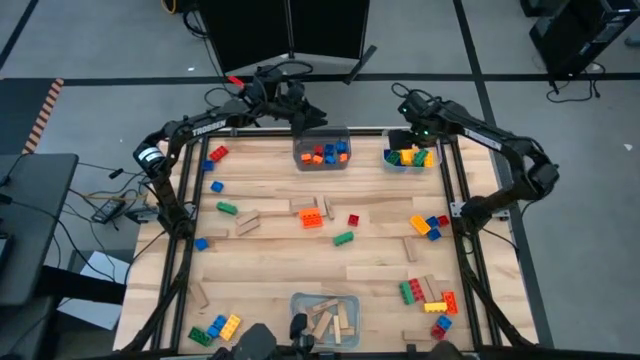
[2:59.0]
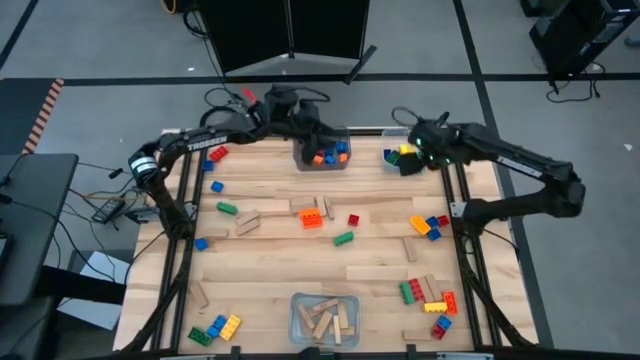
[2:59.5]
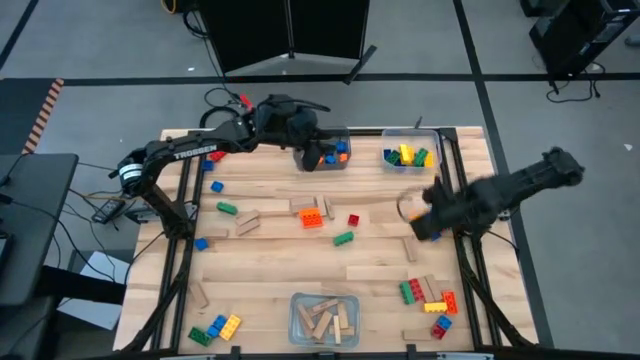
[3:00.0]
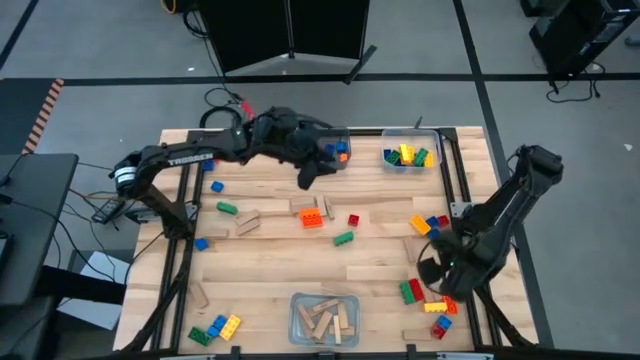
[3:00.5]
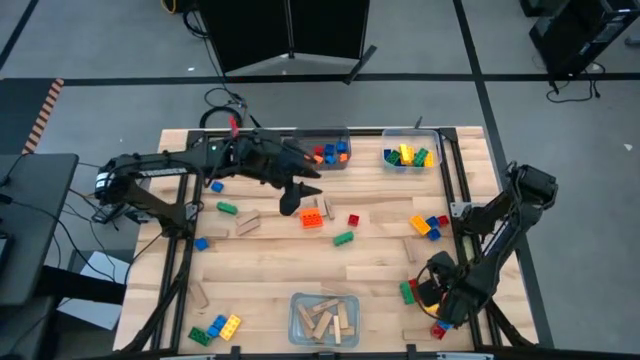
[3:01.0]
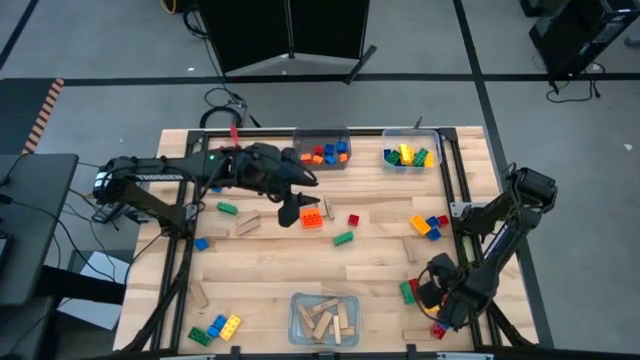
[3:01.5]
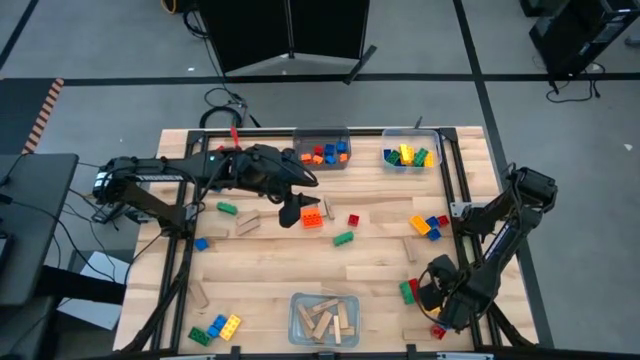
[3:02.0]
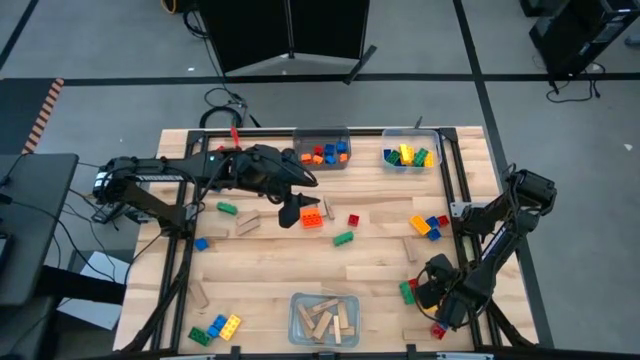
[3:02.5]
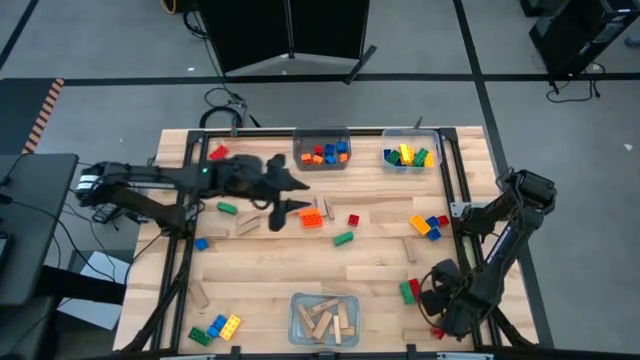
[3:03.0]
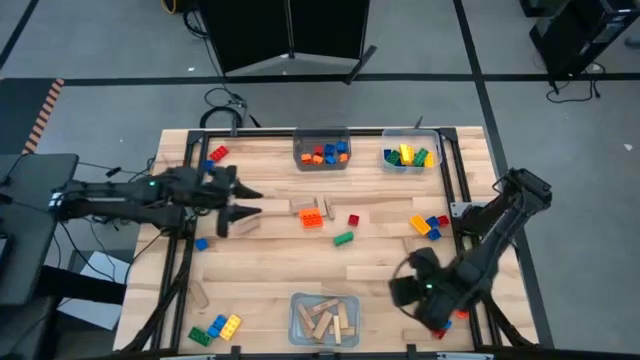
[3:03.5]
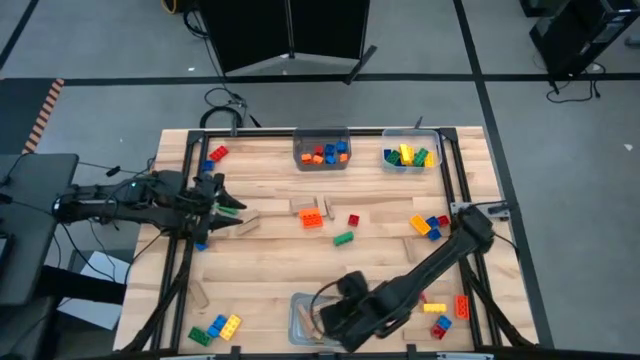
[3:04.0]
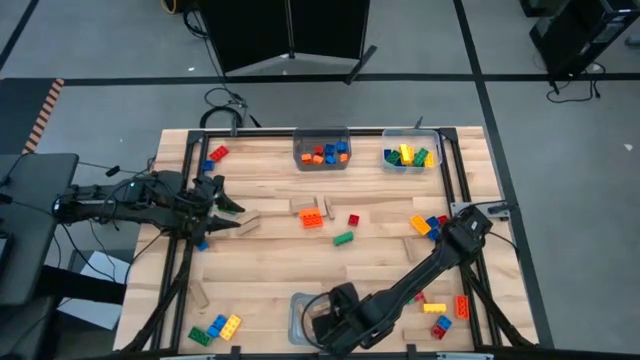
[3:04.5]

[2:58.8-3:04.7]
Task: Sort blocks by size
Put the brown block into the gray bin

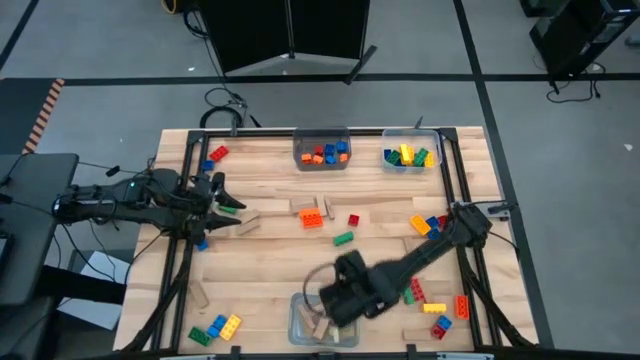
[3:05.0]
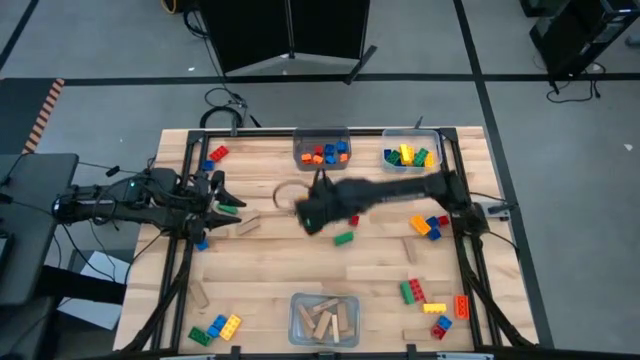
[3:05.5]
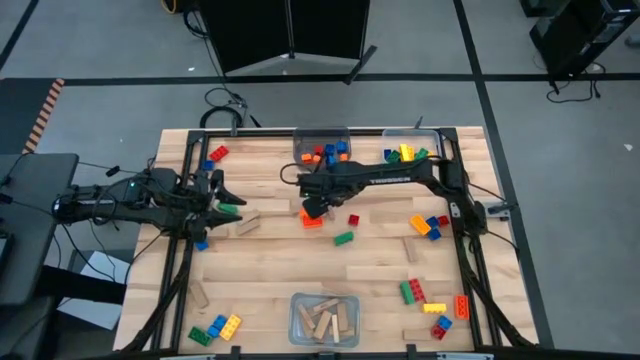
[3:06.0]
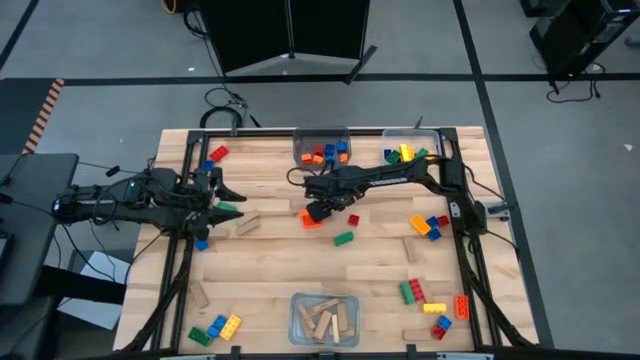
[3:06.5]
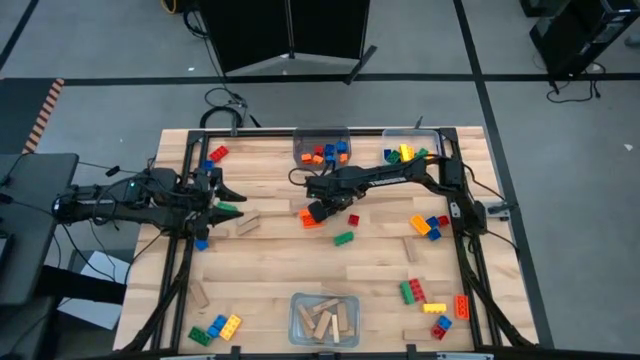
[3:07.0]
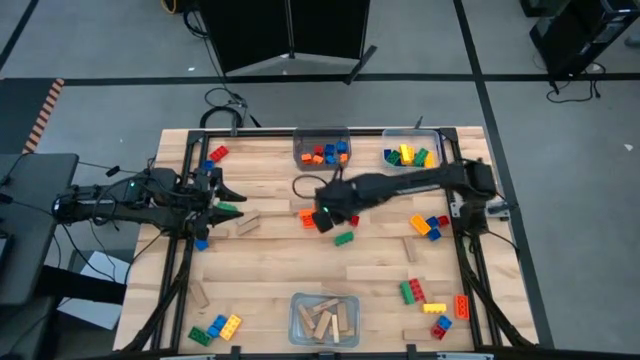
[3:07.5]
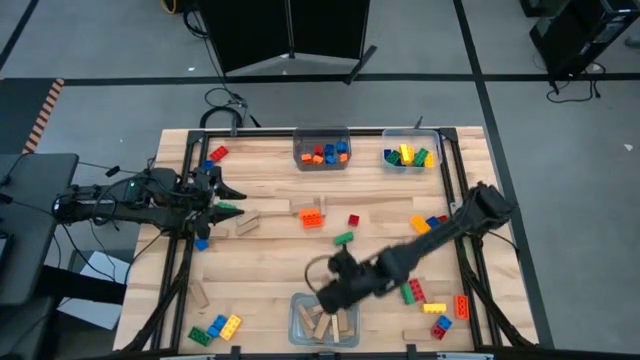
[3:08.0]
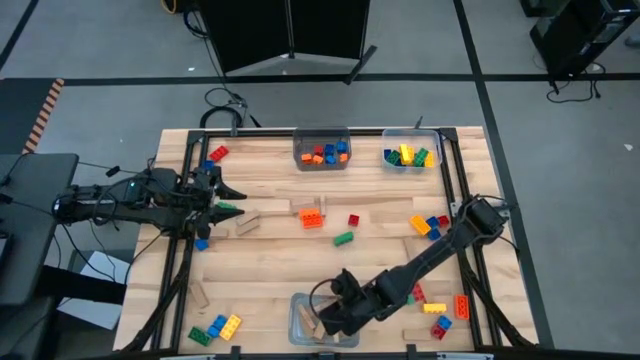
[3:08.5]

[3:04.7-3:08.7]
Put the brown block into the gray bin

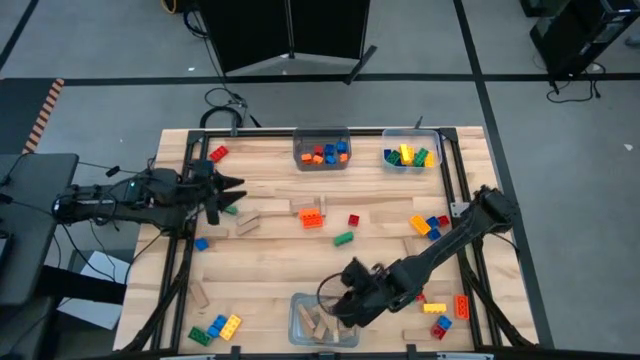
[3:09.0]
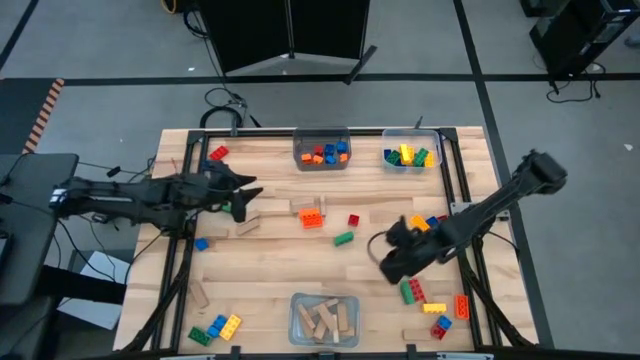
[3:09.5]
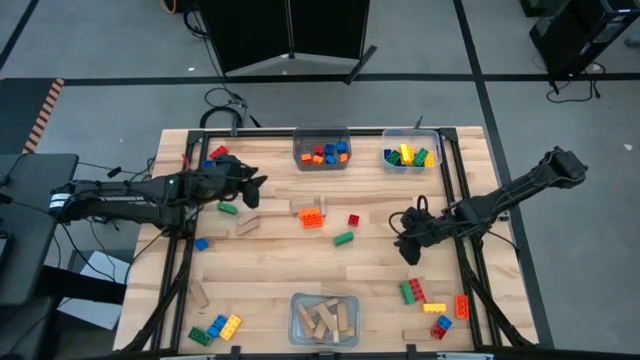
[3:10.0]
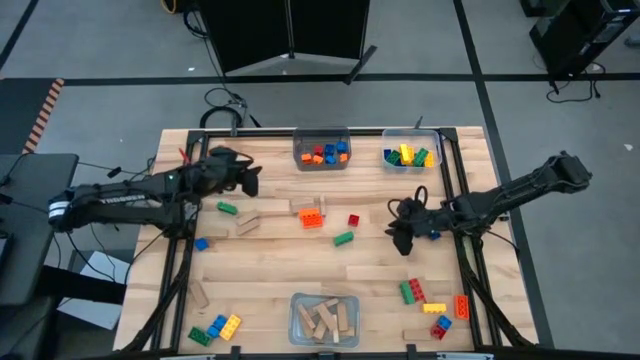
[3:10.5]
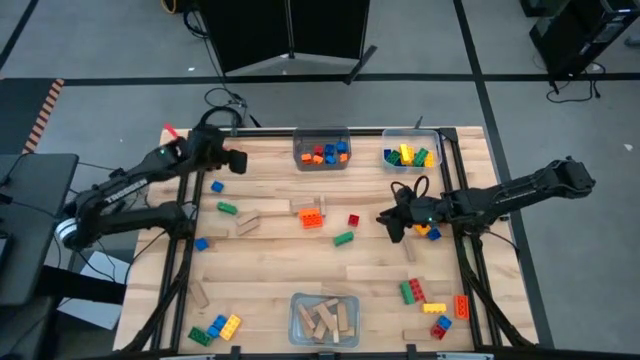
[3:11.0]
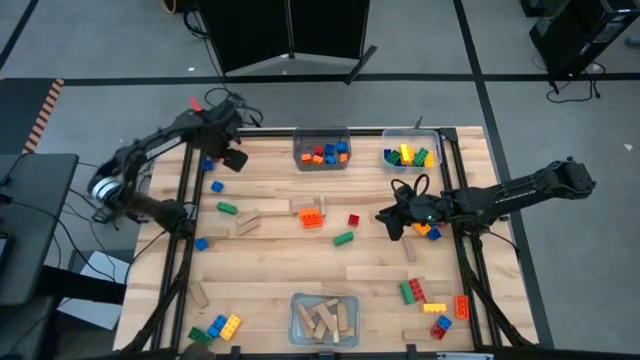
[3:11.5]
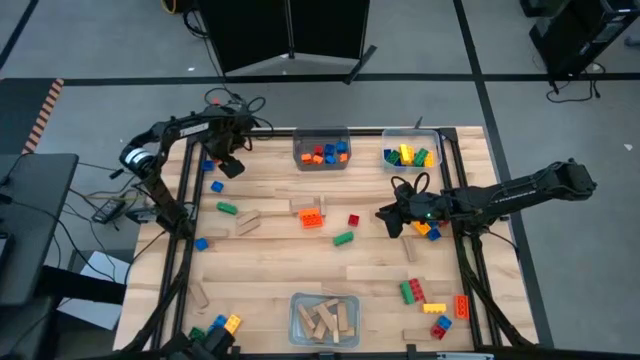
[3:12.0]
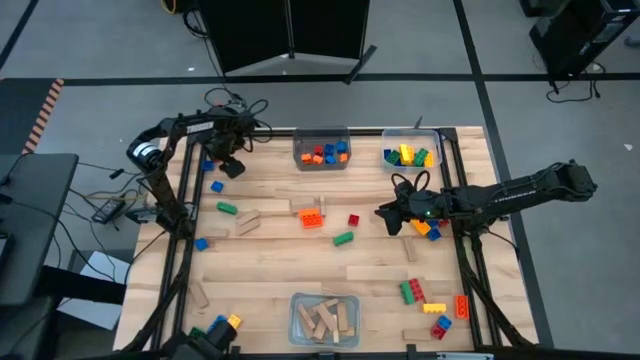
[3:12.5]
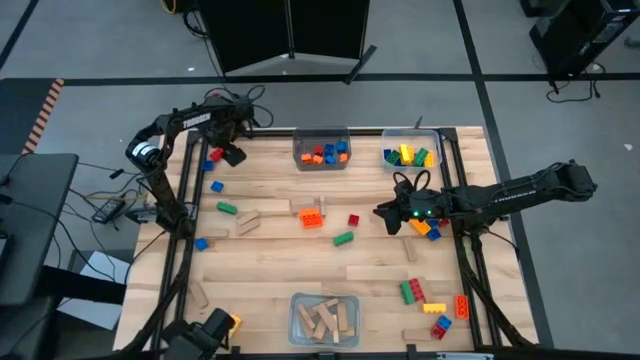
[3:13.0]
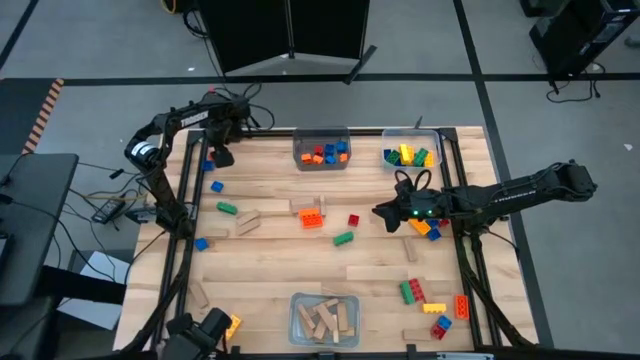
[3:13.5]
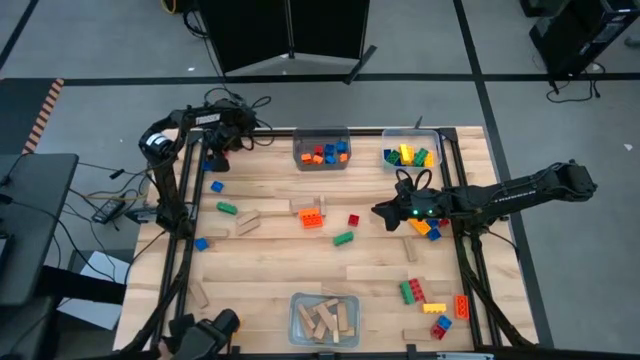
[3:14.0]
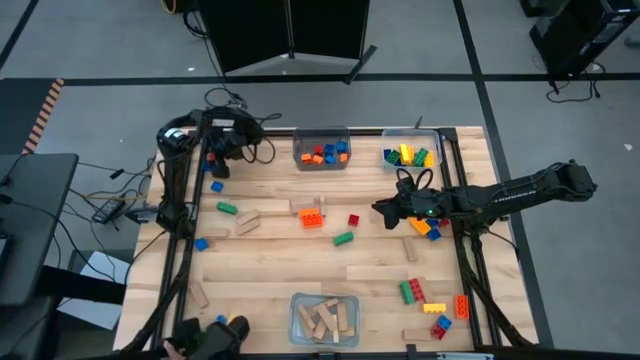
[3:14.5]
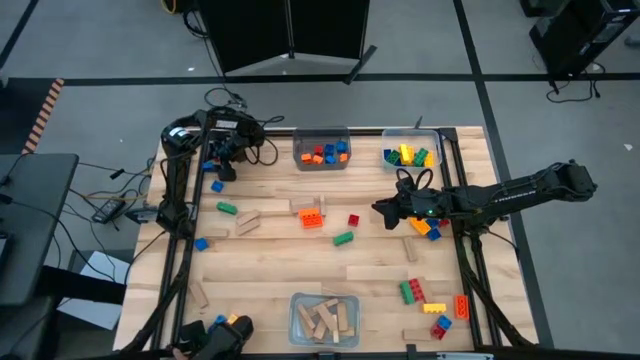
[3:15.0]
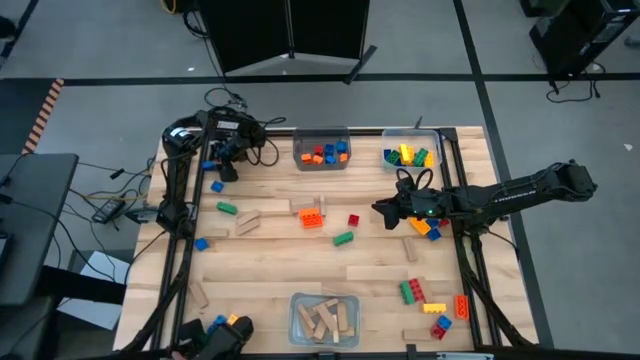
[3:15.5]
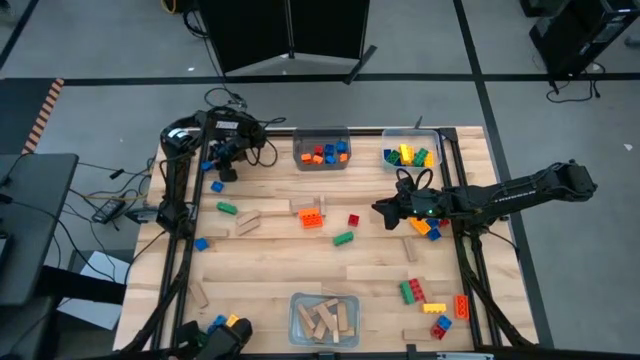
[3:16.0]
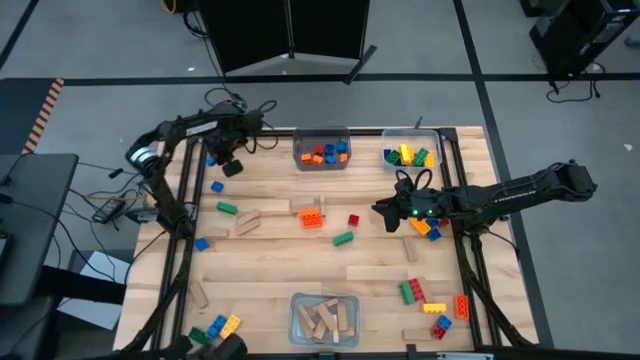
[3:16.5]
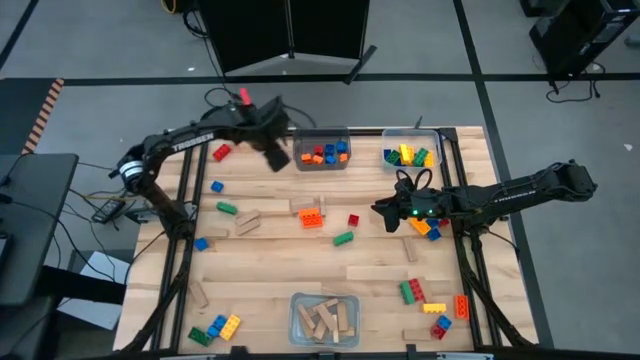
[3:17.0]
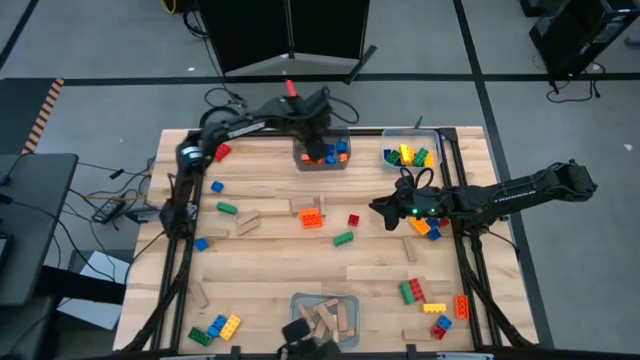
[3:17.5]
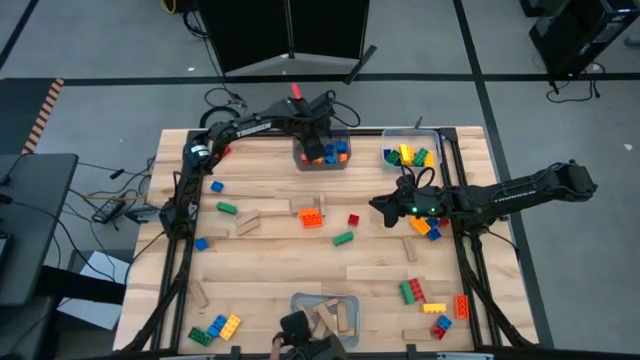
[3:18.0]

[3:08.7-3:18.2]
Put the small blue game piece into the black bin

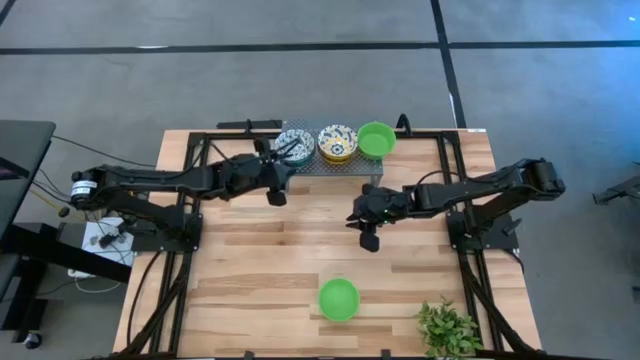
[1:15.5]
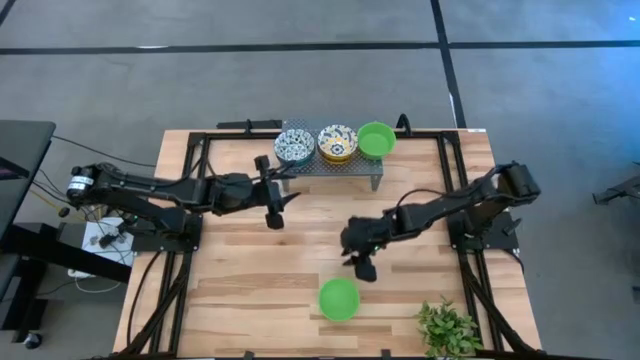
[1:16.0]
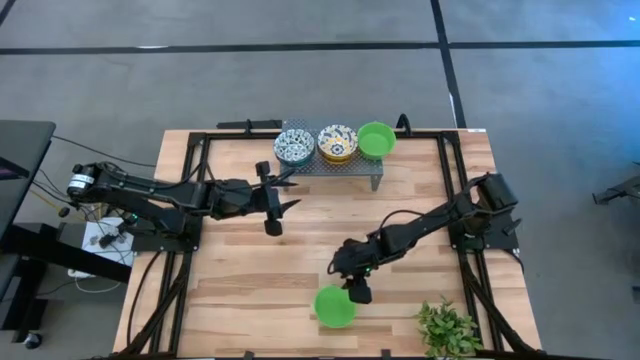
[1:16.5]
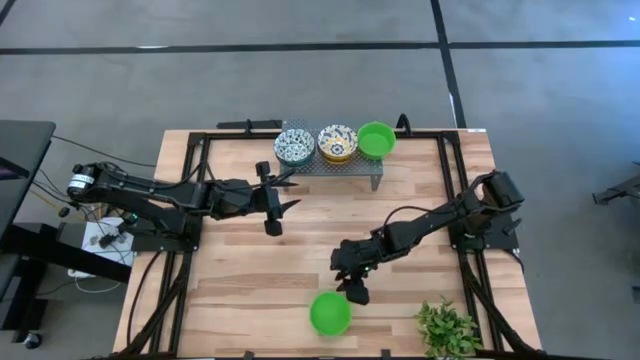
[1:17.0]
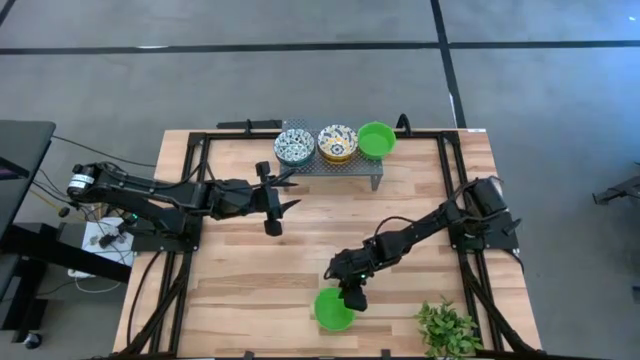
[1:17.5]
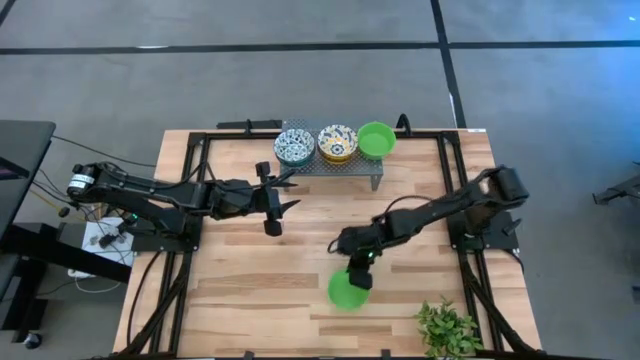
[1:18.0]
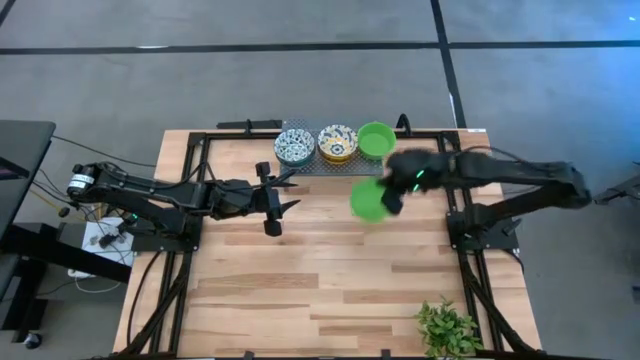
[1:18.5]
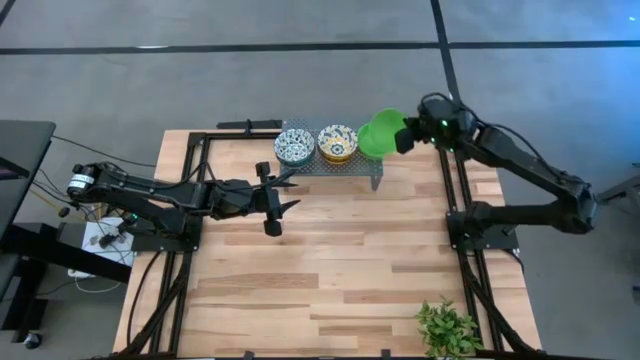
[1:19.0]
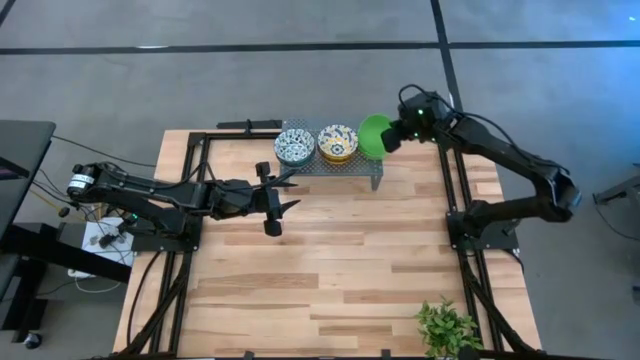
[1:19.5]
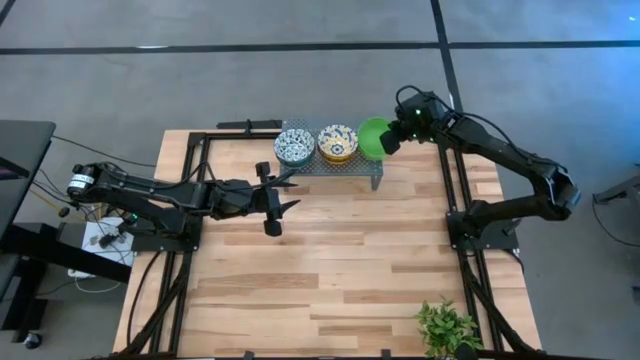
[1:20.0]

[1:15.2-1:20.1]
Task: Pick & Place Mini bowls
Stack the green bowl on the green bowl on the shelf
